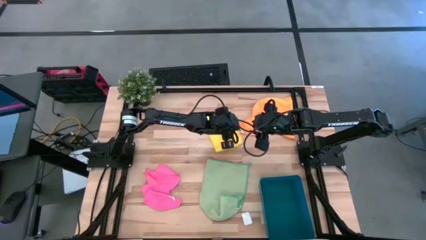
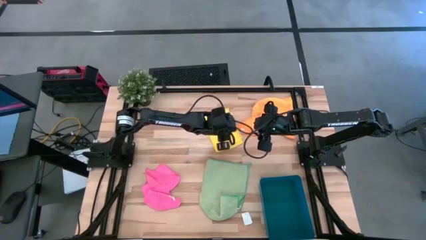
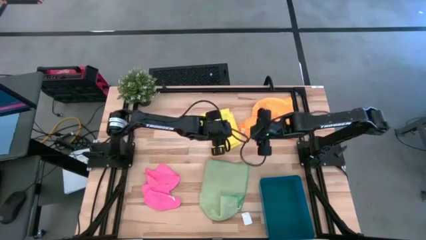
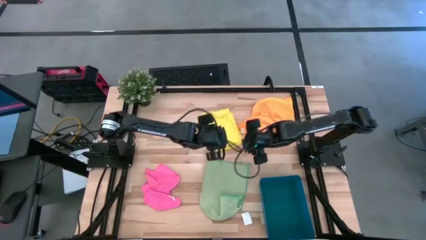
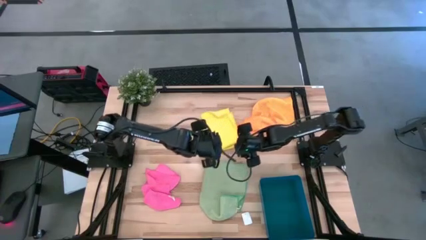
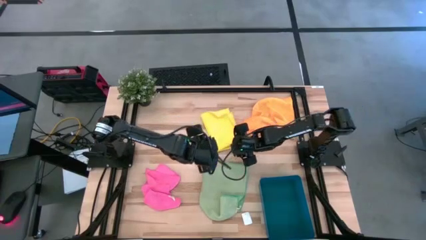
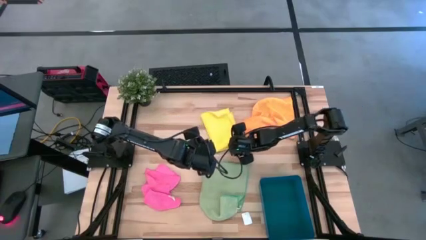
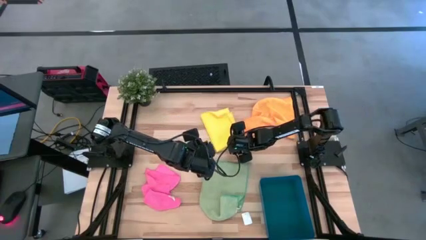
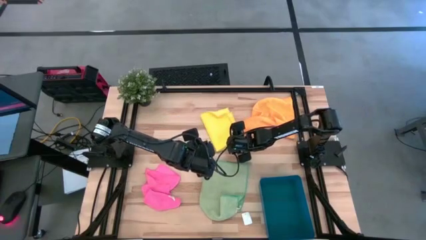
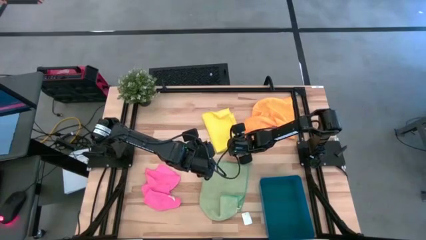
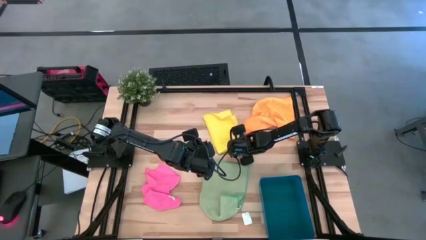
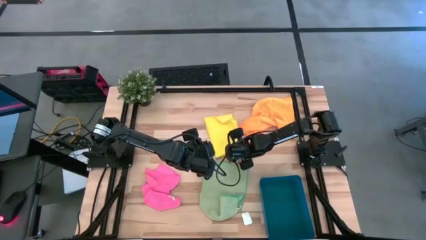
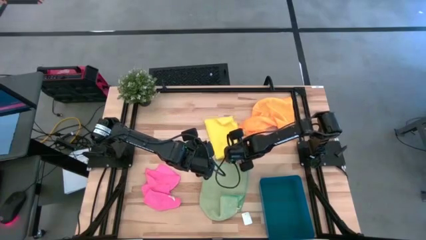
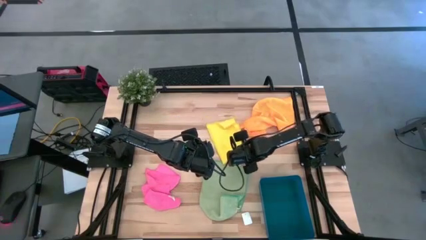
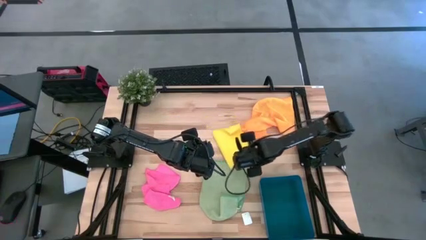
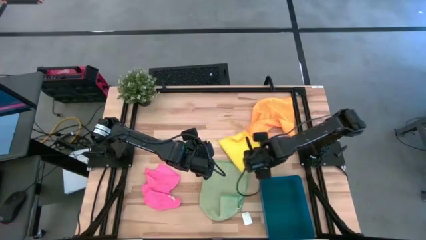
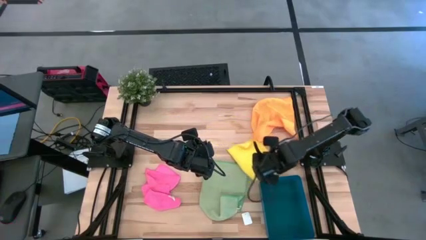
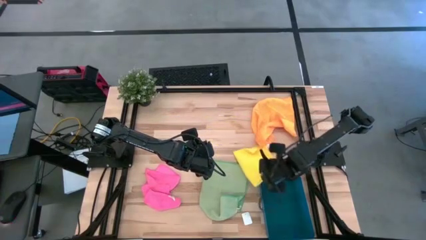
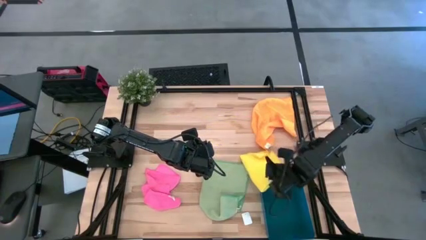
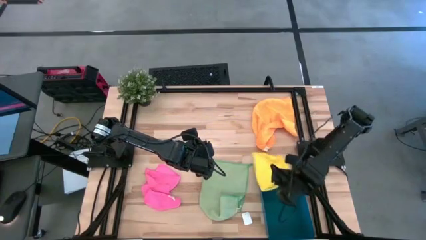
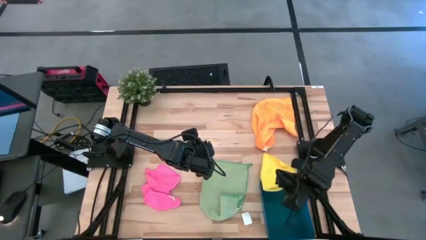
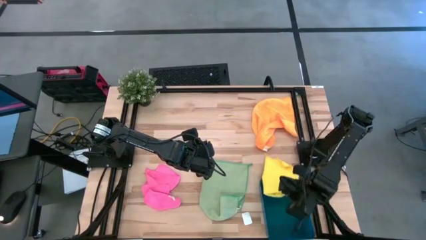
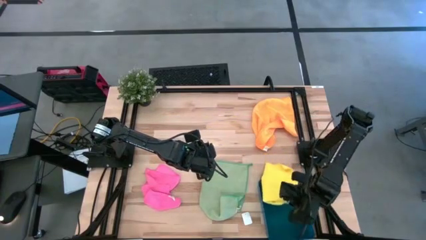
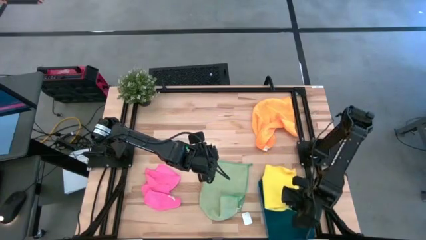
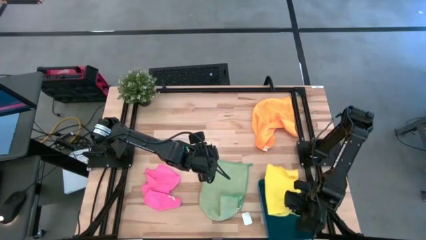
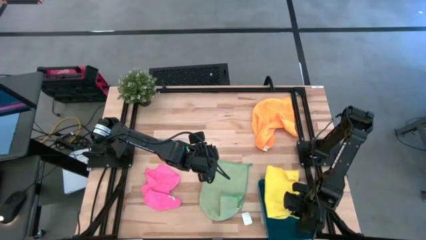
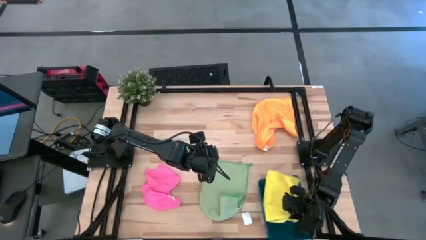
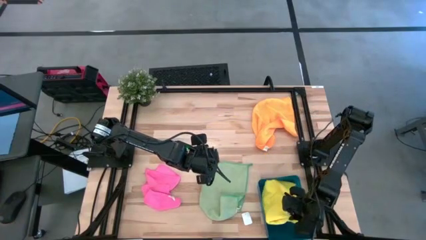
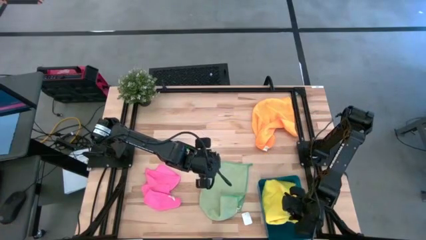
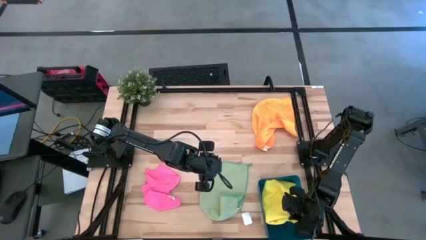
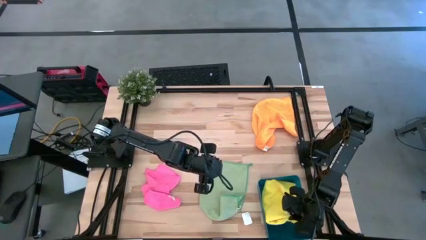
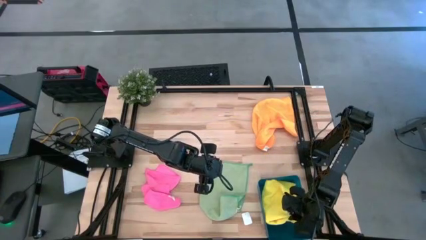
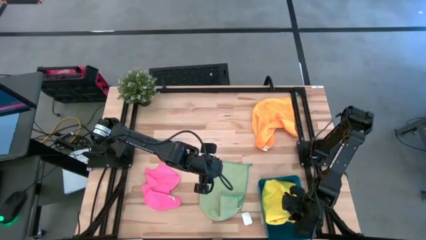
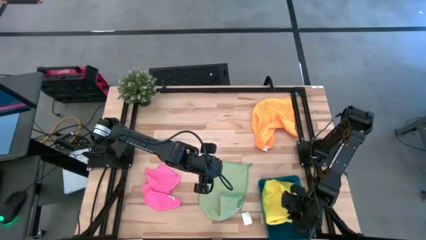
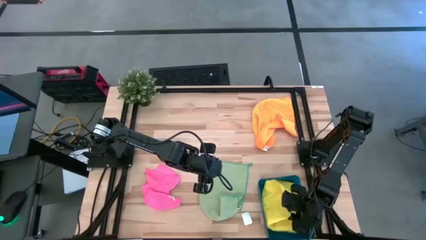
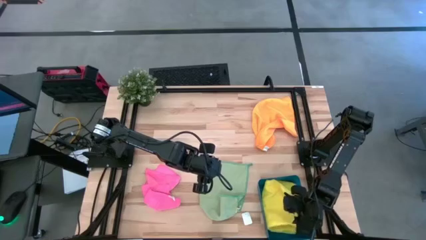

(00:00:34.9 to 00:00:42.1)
Task: Fold microfiber towels
Put the folded yellow microfiber towel into the blue bin

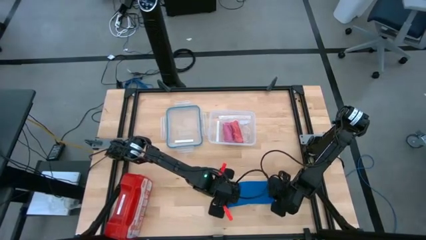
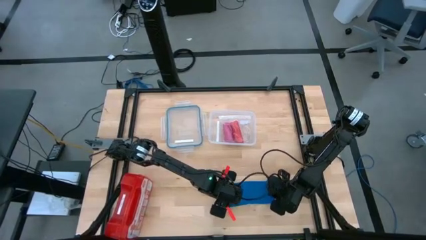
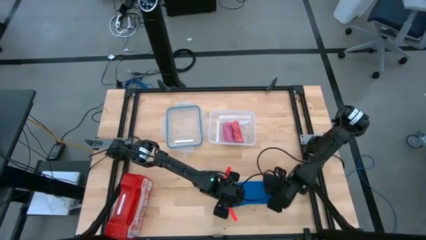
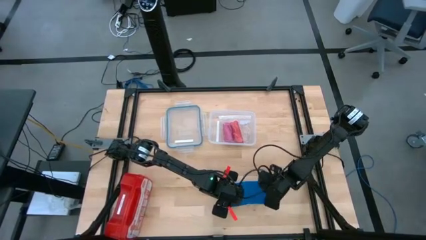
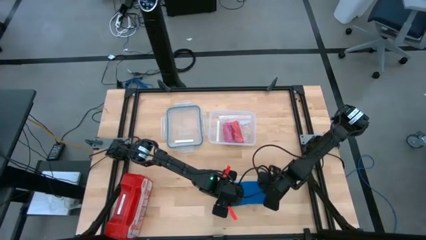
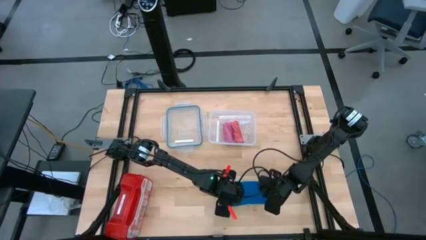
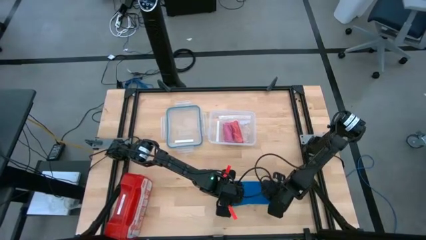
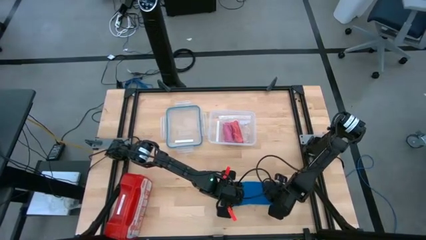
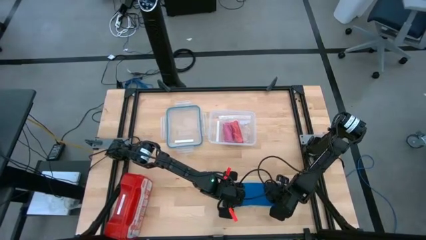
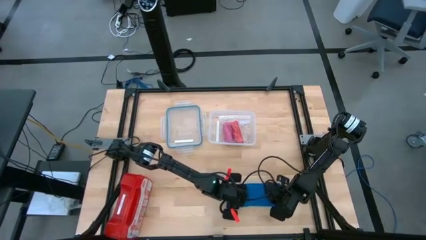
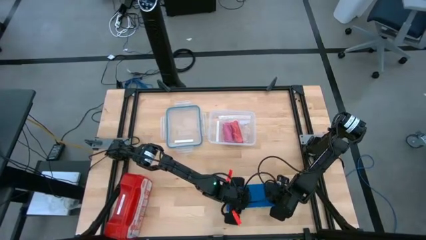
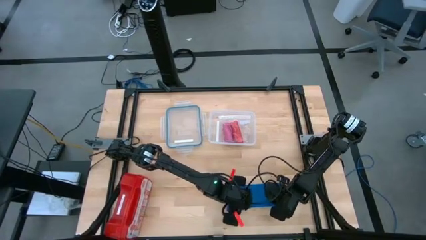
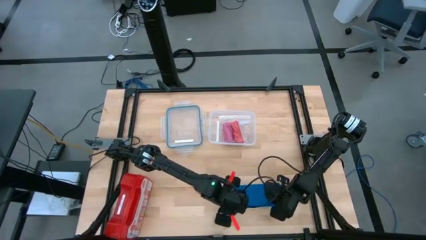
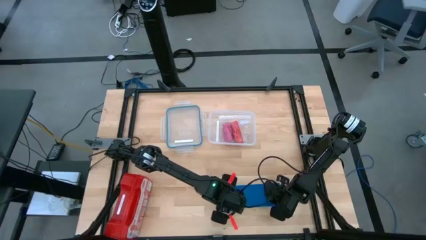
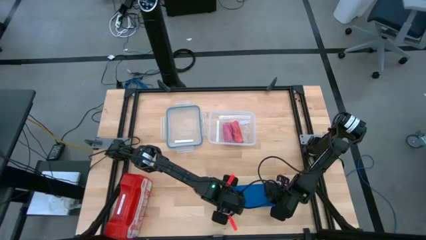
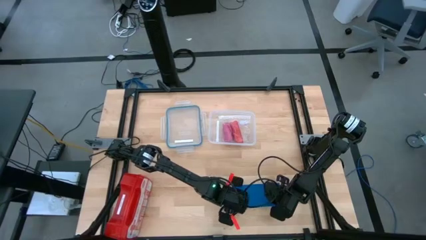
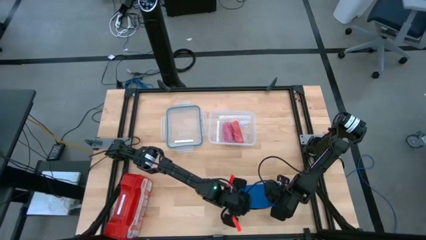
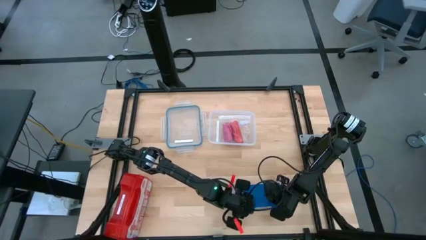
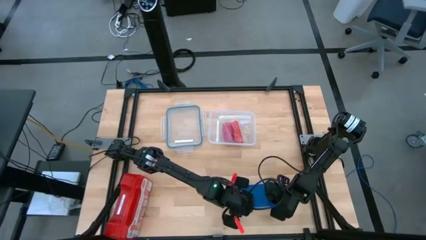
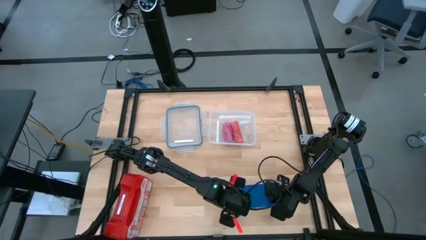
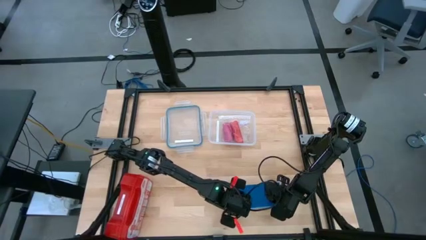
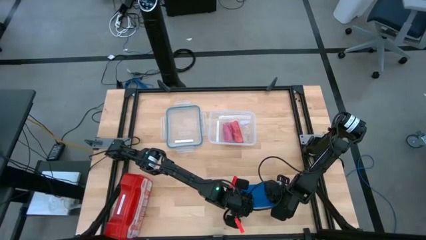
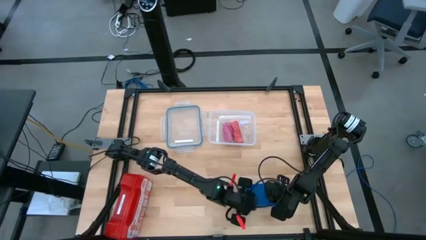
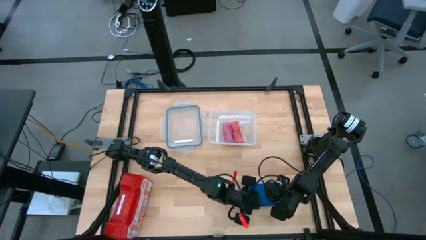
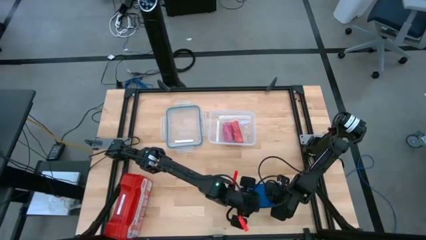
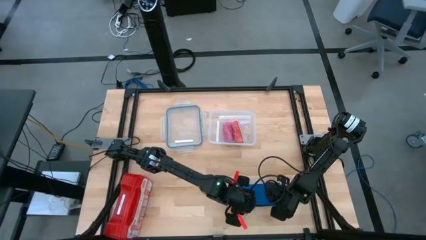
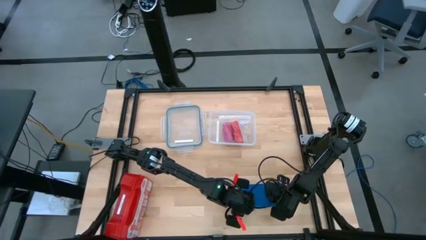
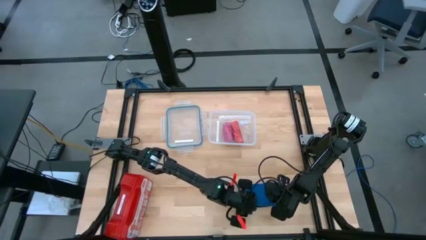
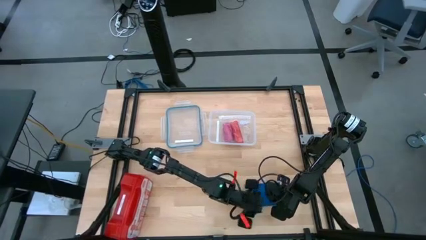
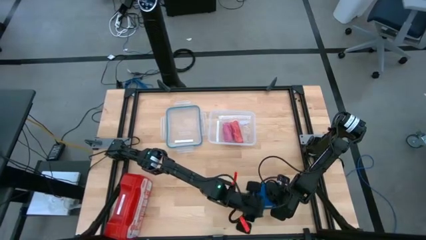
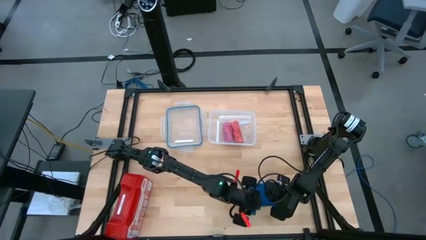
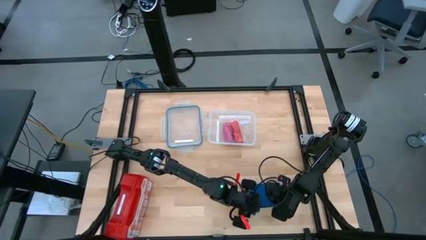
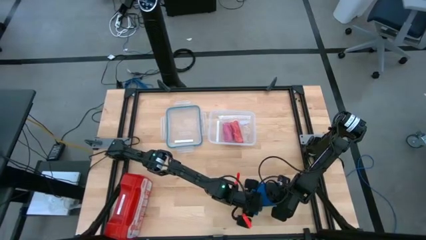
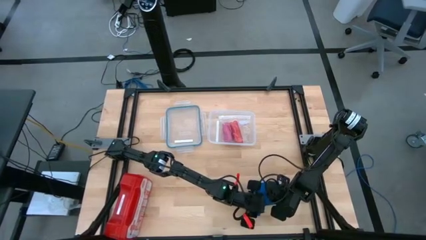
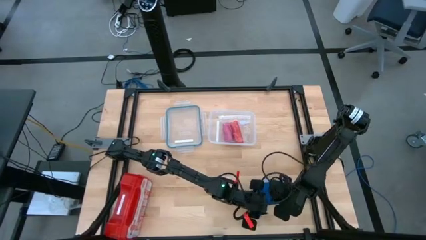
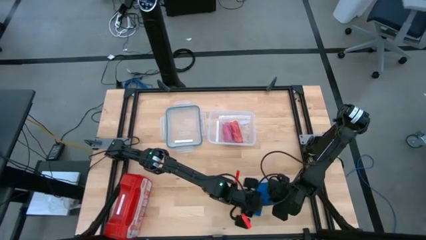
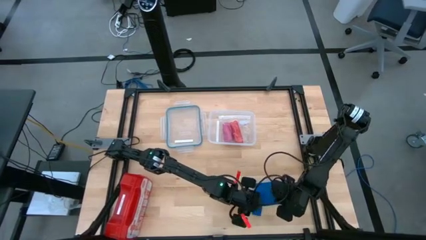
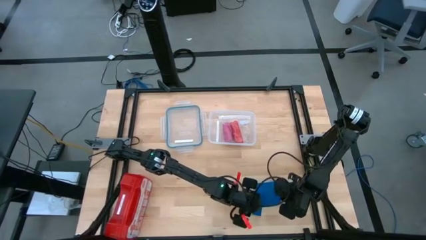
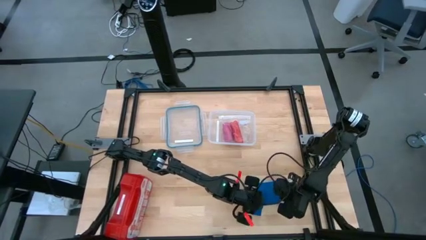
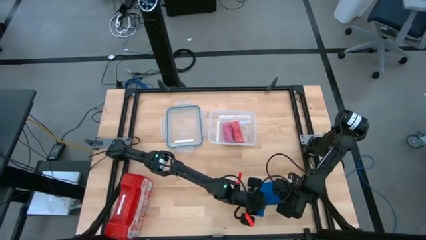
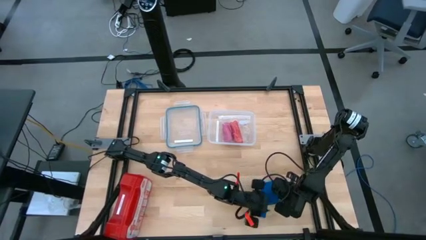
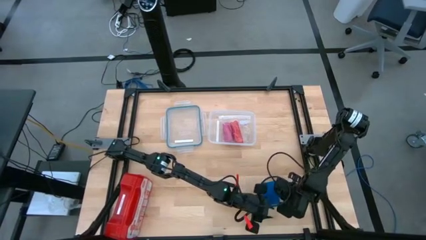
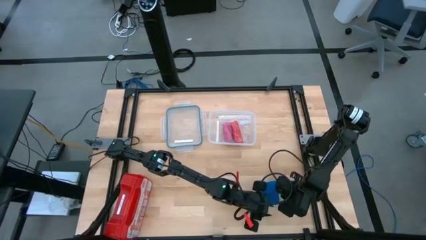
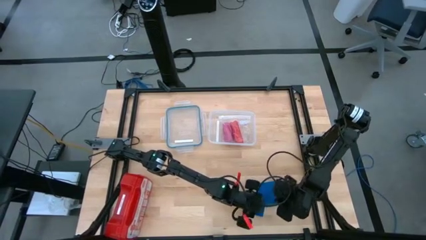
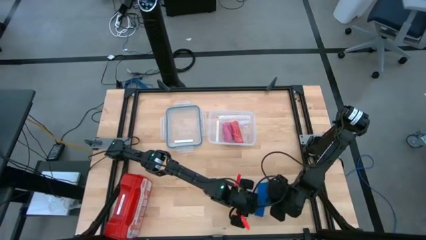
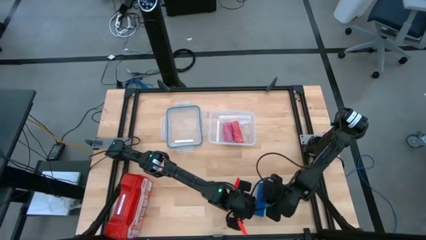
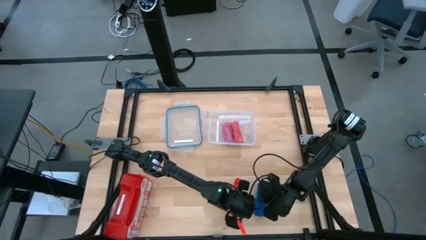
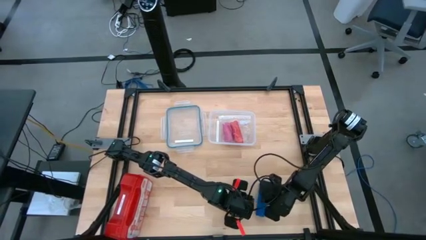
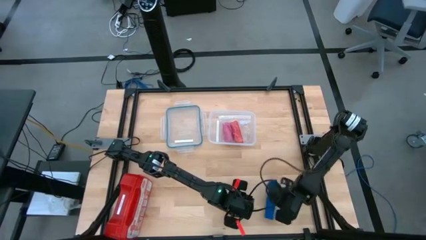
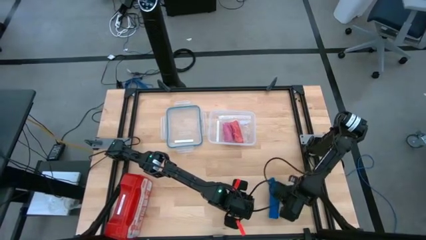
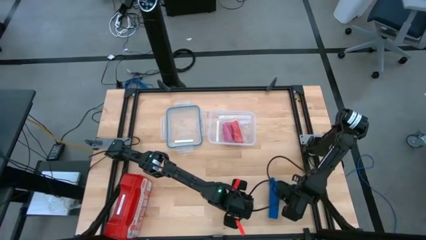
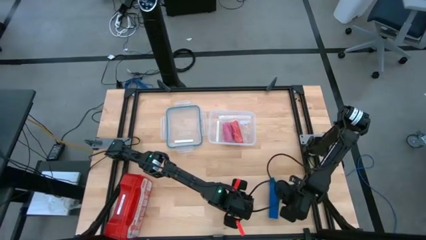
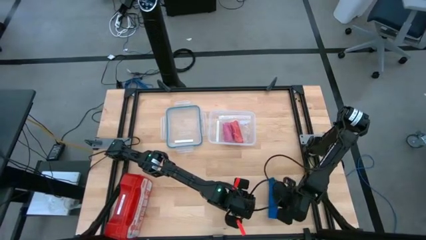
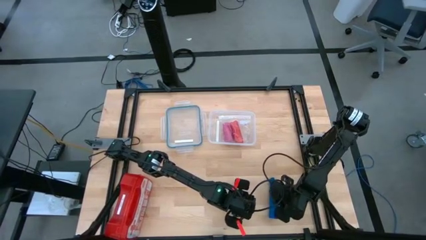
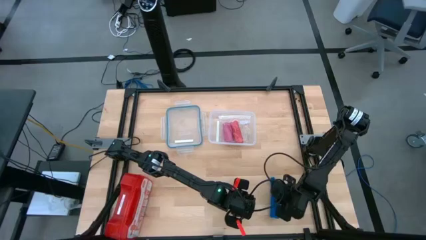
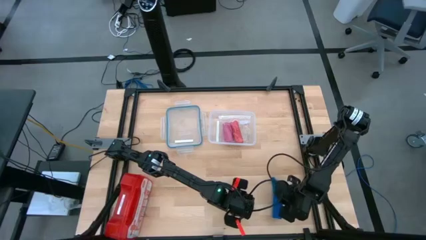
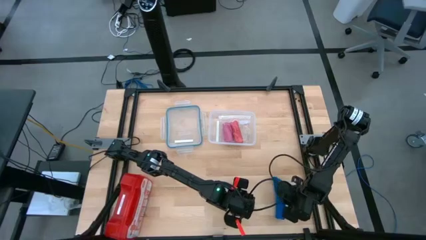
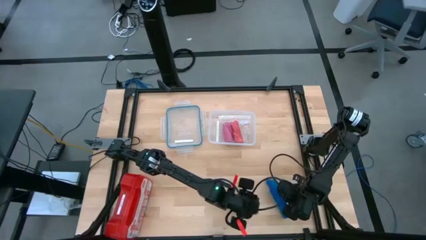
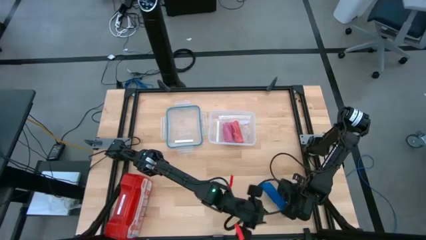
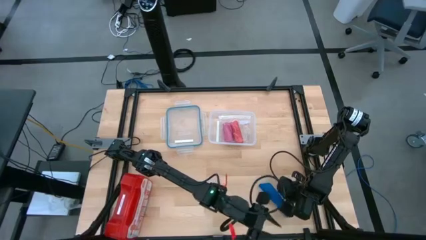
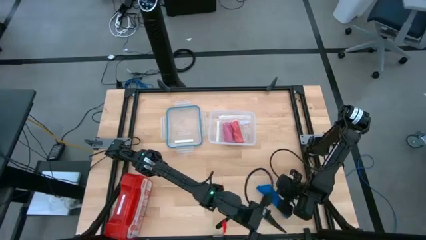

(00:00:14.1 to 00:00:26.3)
Task: Roll bandage
Roll the blue bandage
